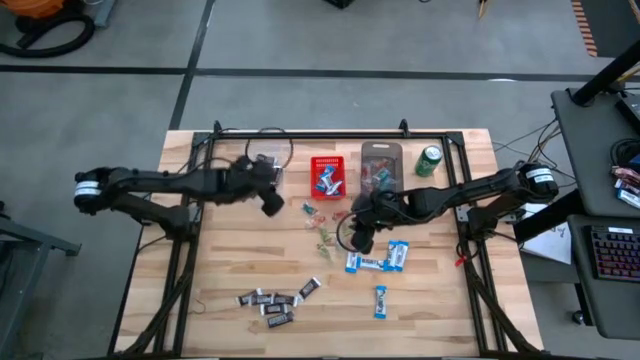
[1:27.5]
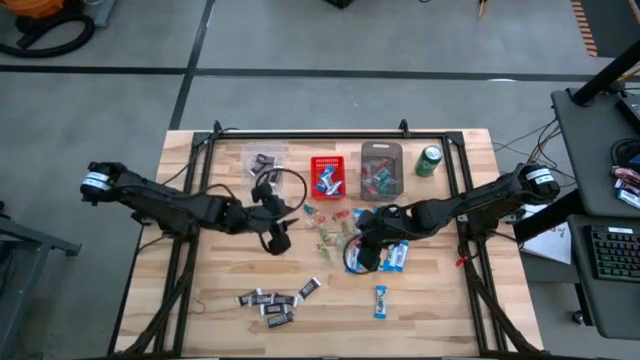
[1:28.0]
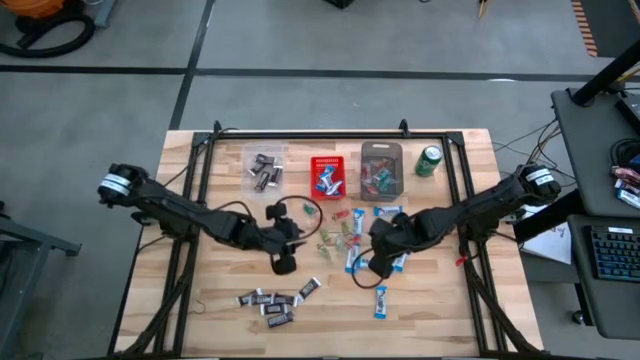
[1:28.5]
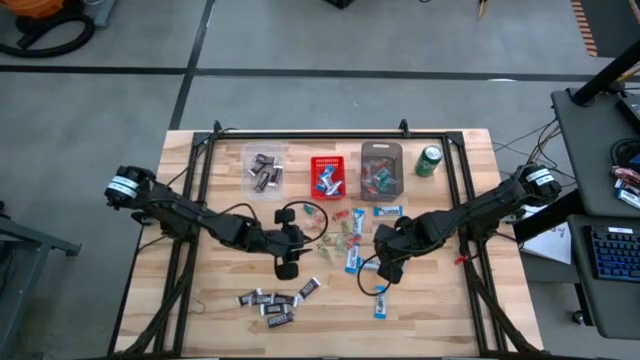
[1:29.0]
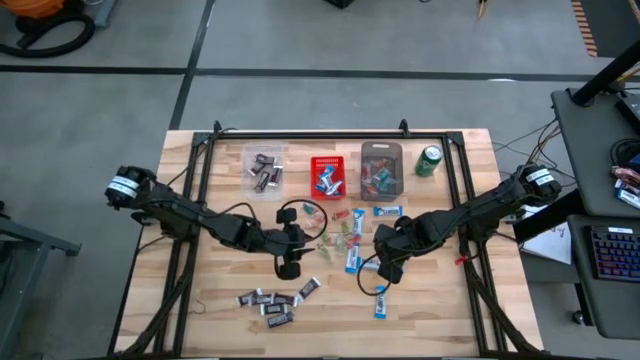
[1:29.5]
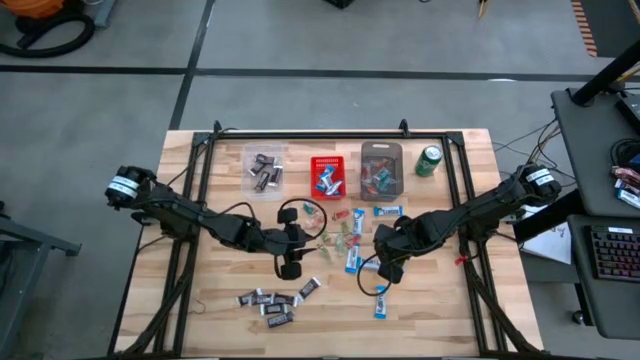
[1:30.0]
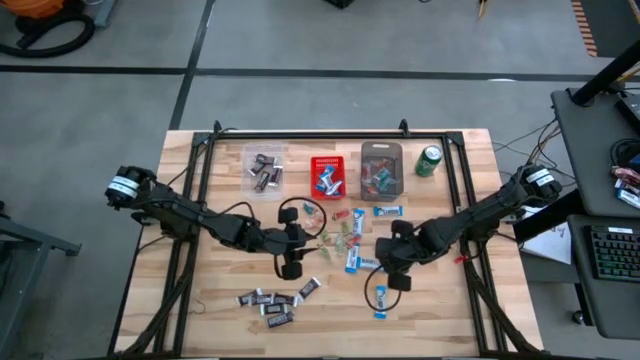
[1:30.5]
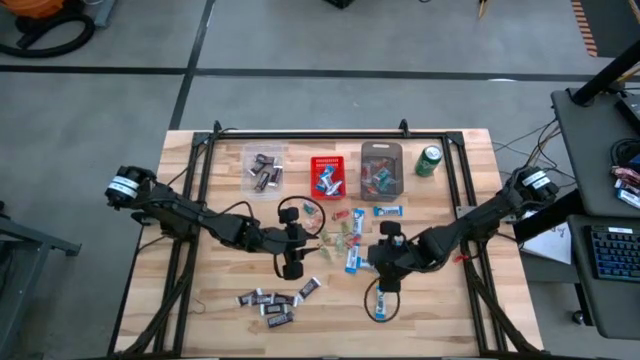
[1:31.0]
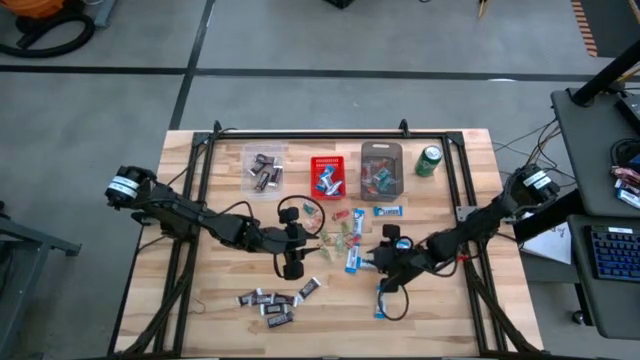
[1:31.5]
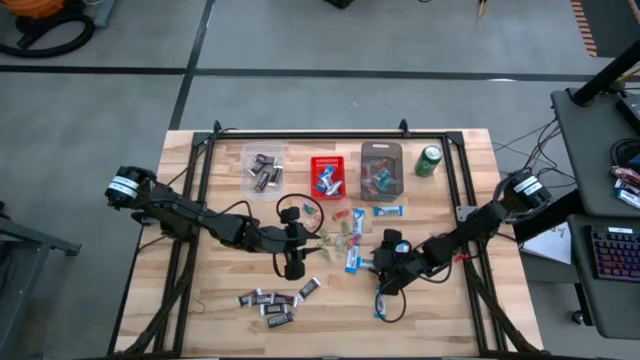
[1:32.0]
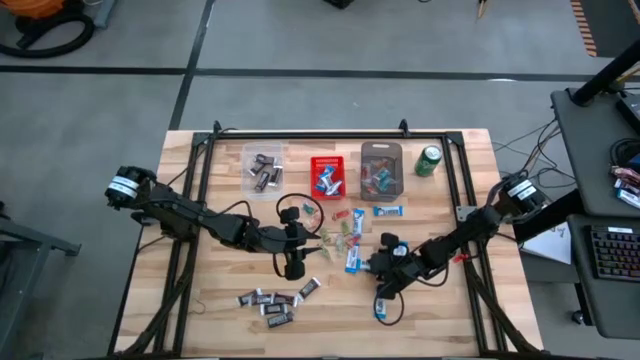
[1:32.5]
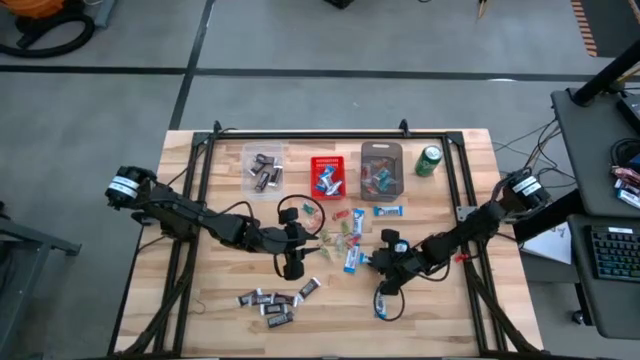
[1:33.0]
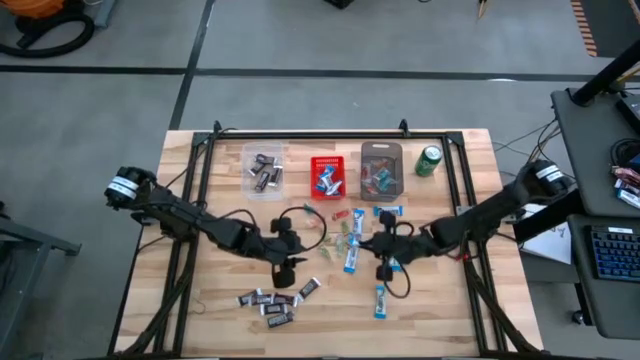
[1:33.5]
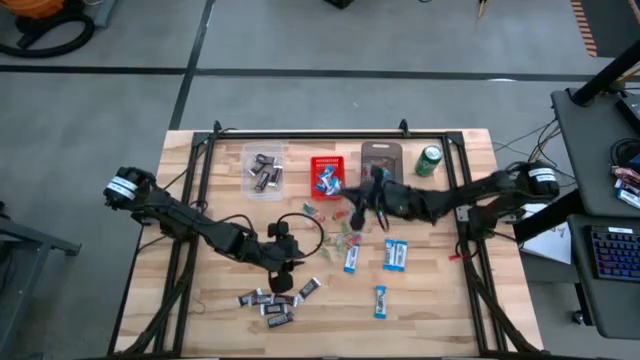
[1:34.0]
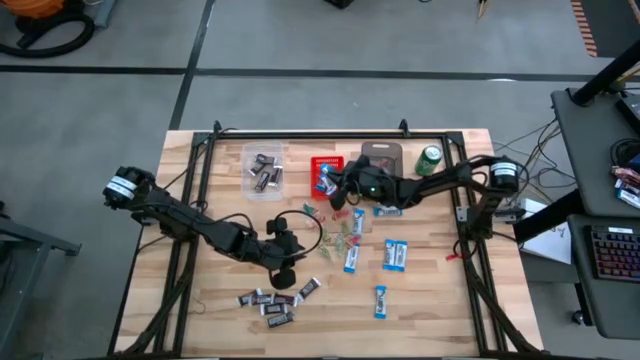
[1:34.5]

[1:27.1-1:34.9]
Task: Sort candy
Put the white chocolate bar into the red bin

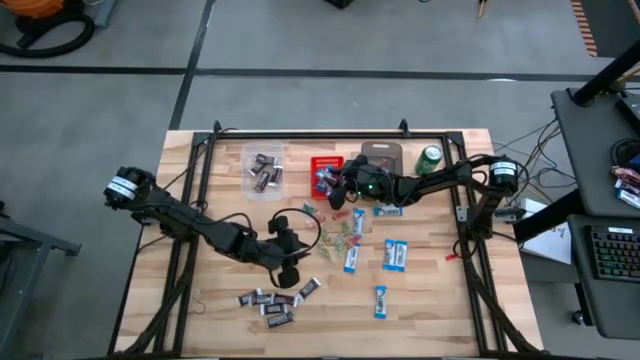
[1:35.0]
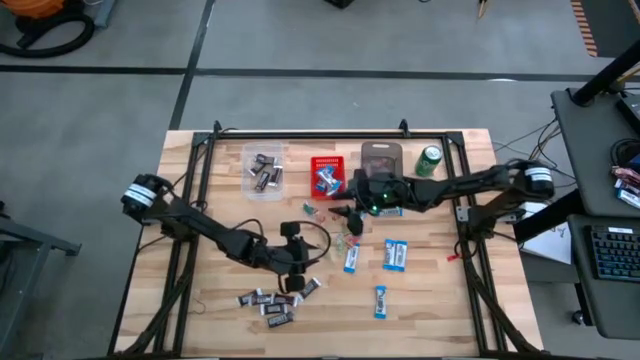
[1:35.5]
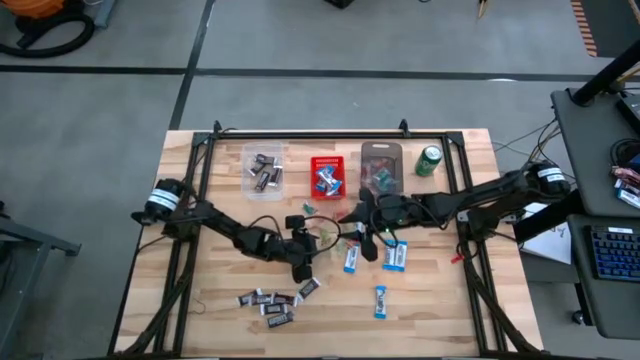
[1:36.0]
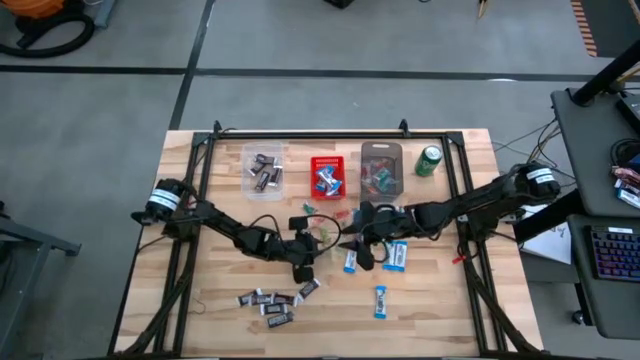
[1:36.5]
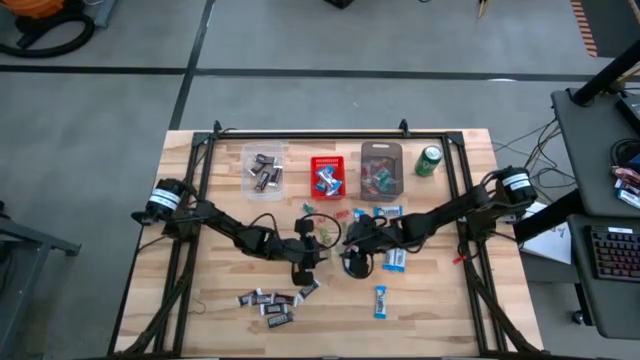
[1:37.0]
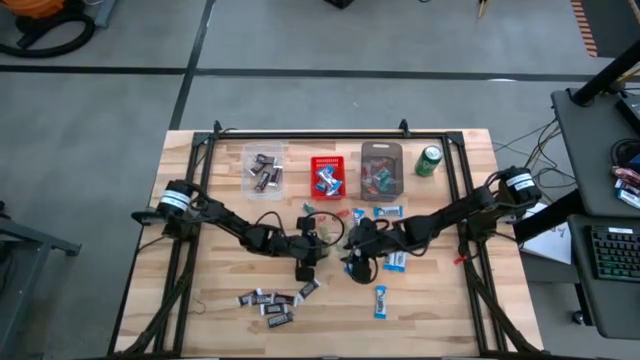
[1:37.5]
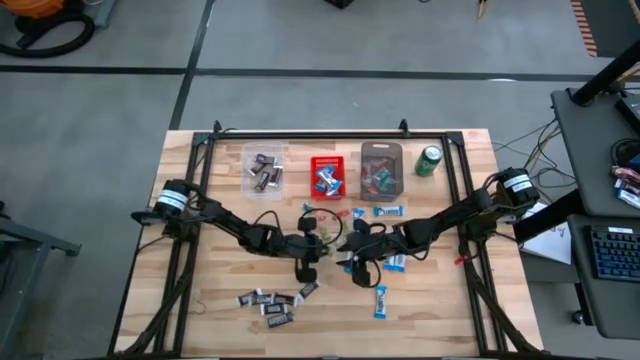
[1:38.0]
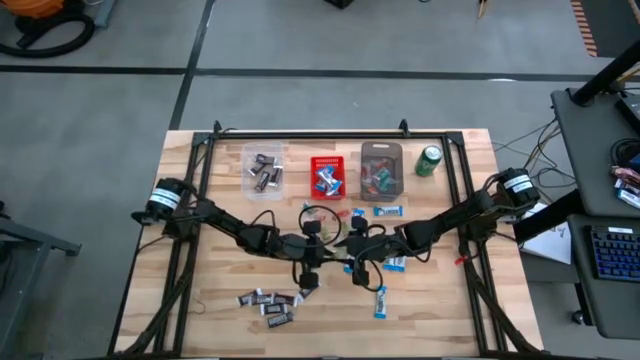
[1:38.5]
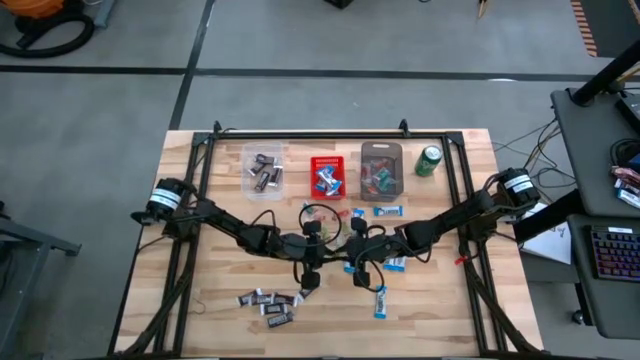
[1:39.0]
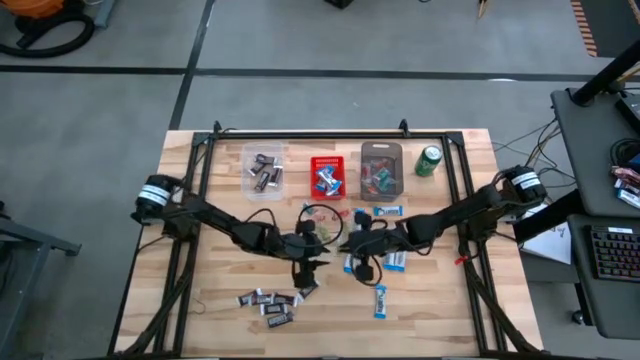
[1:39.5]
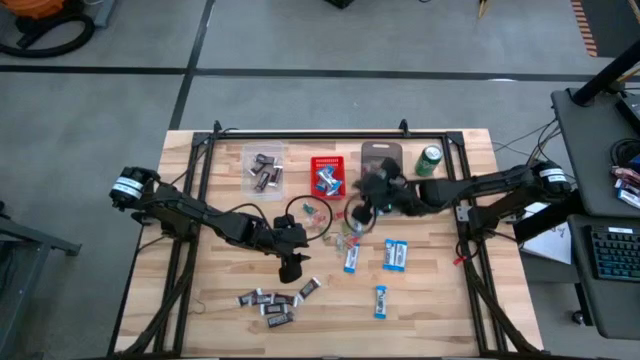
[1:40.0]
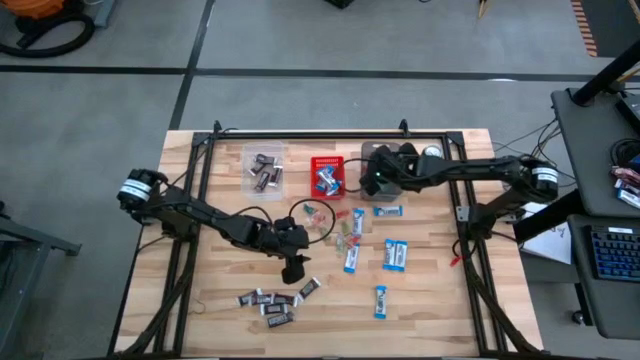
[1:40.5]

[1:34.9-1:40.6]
Put the green gummy candy into the black bin

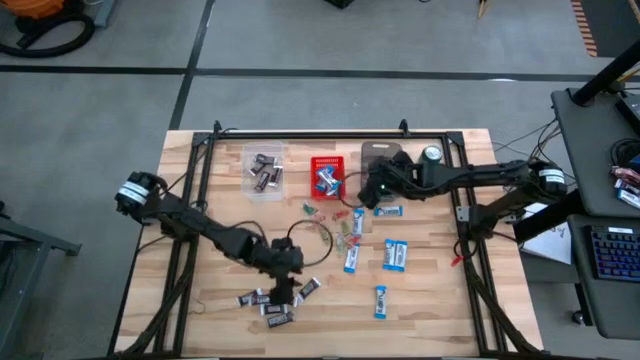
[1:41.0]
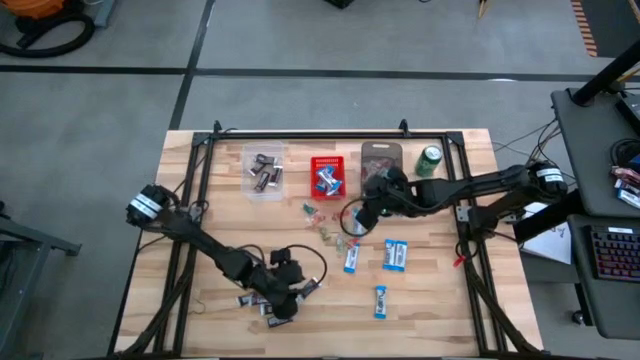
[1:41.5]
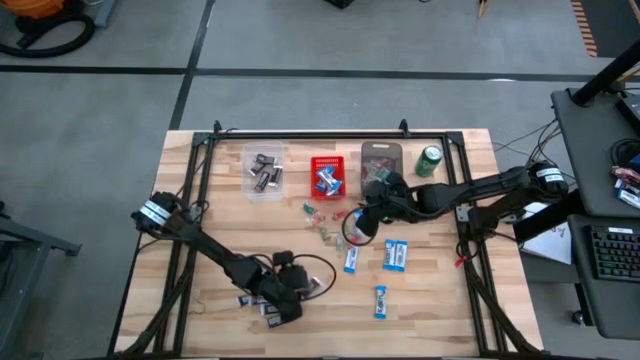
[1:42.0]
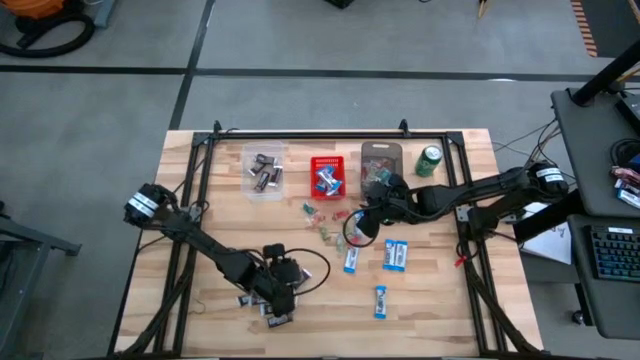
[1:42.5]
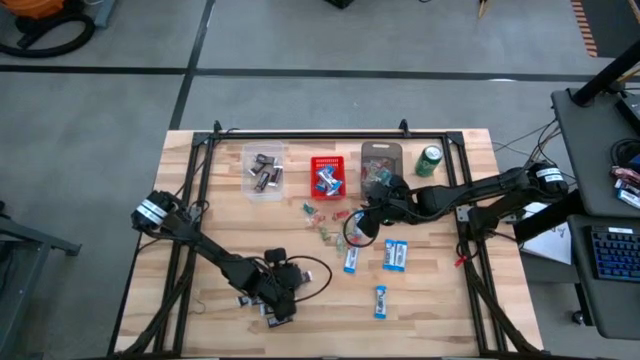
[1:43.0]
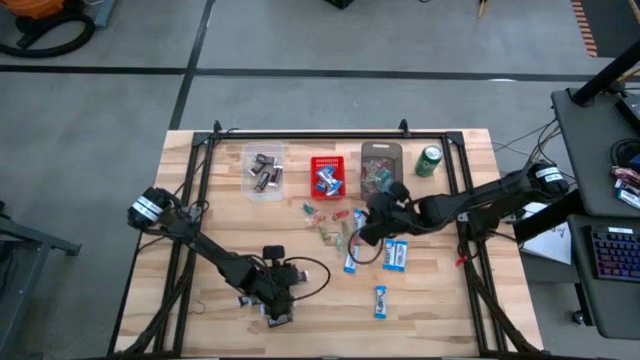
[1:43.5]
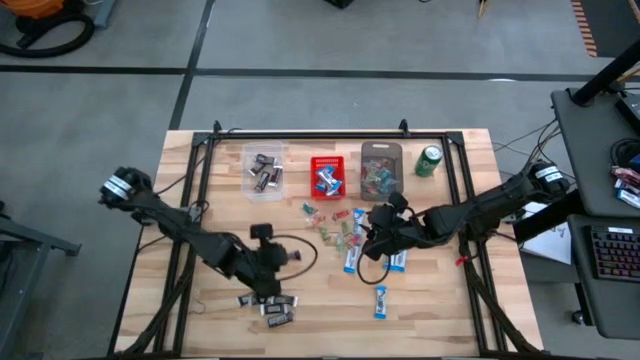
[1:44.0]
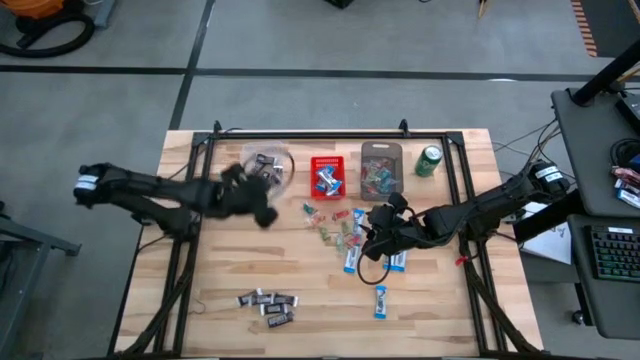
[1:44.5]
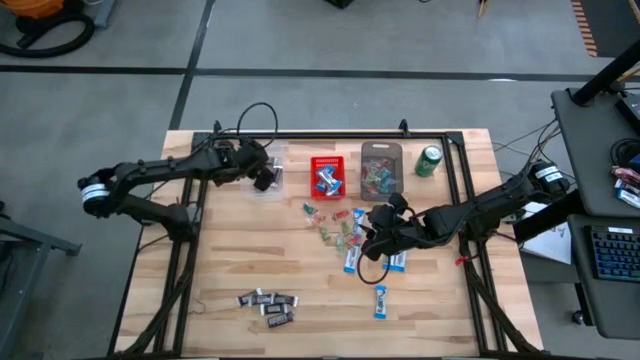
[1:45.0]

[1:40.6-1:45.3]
Put the brown chocolate bar into the transparent bin

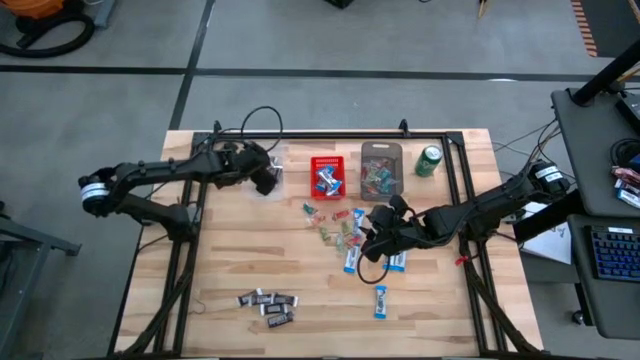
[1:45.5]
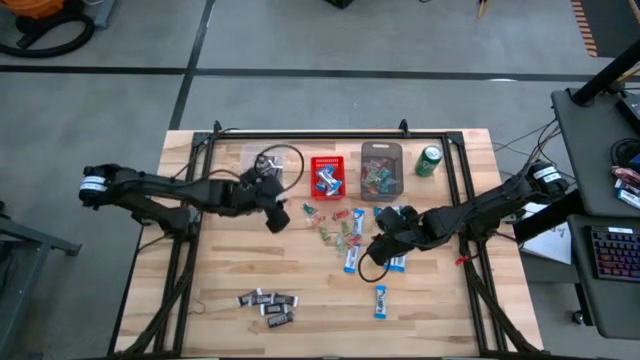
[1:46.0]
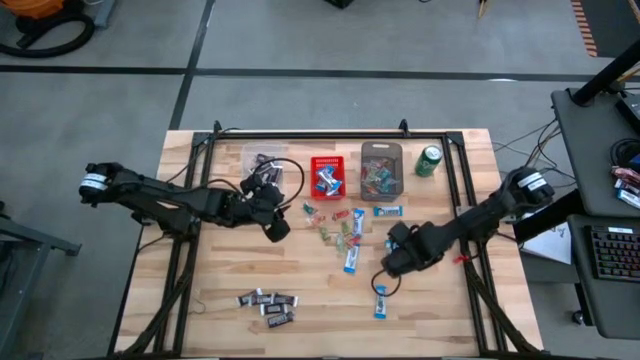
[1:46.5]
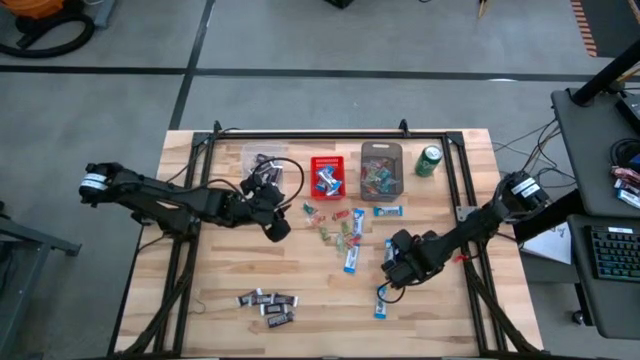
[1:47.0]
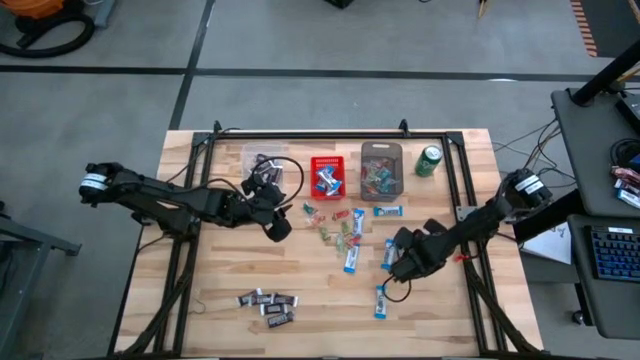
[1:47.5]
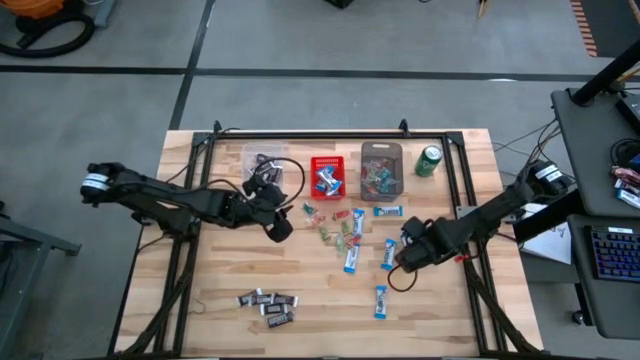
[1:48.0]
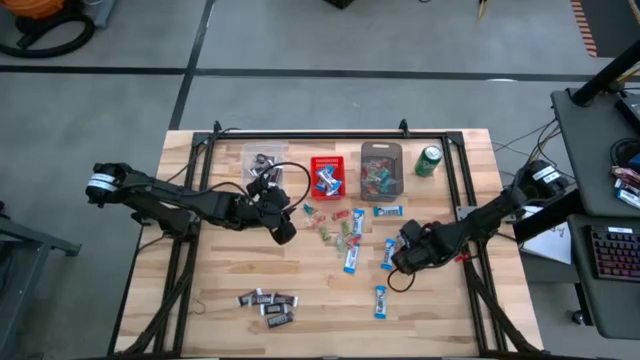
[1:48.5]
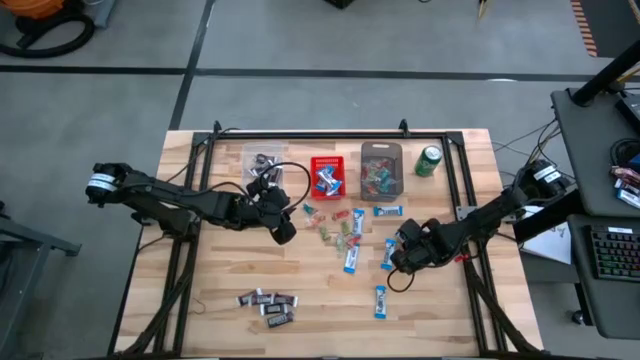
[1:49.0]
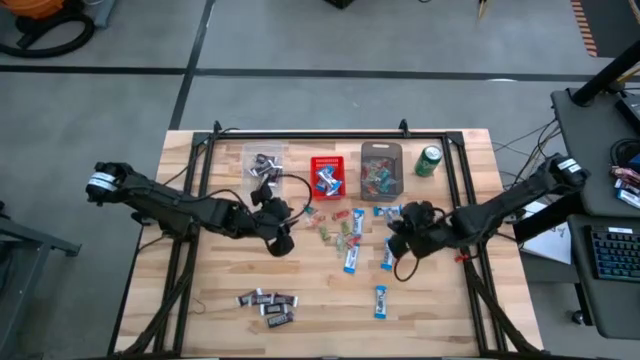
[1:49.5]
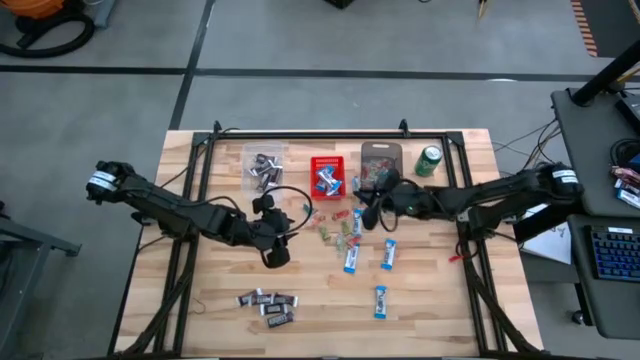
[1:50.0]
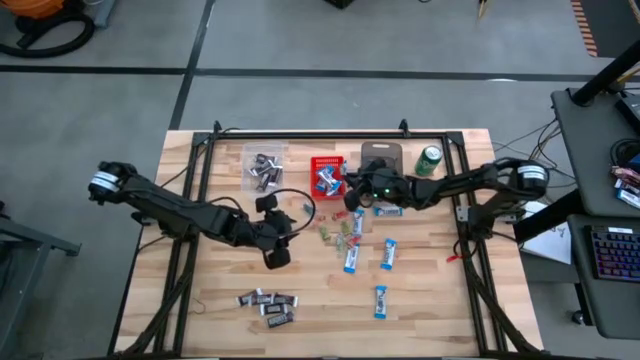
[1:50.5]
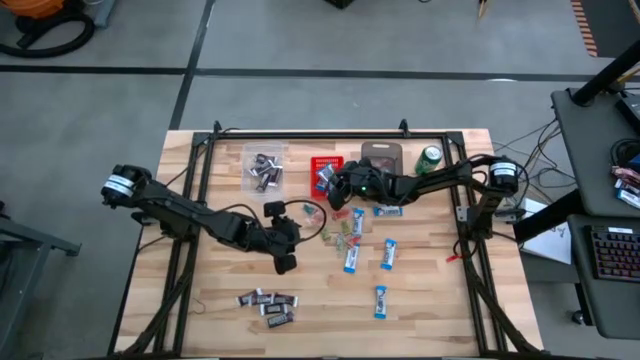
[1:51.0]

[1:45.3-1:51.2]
Put the white chocolate bar into the red bin
